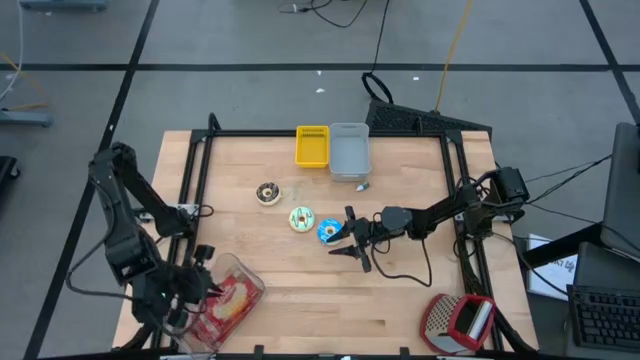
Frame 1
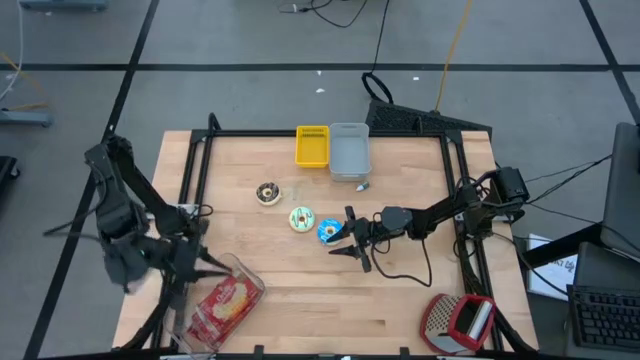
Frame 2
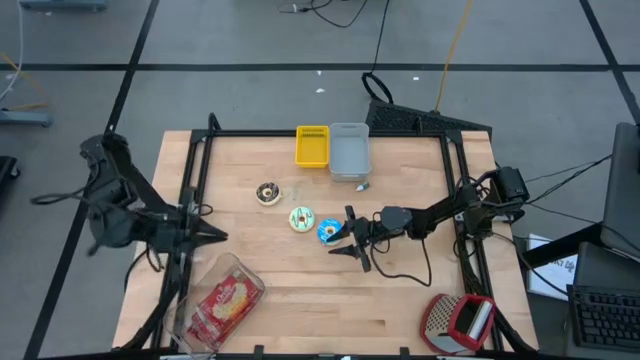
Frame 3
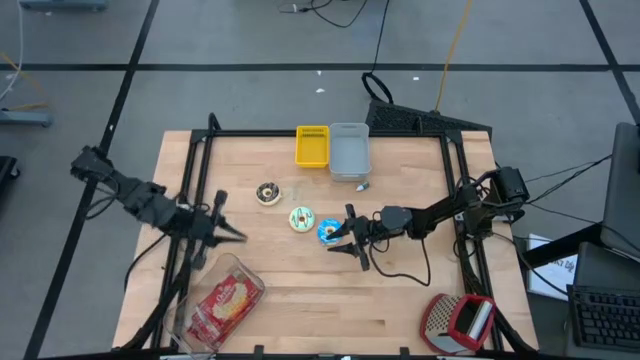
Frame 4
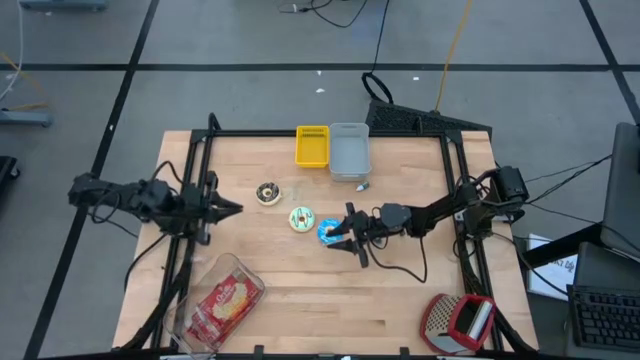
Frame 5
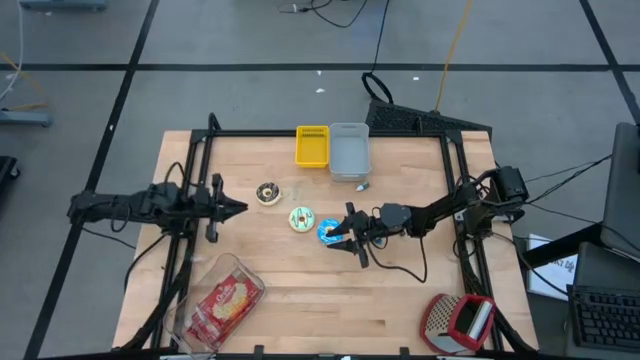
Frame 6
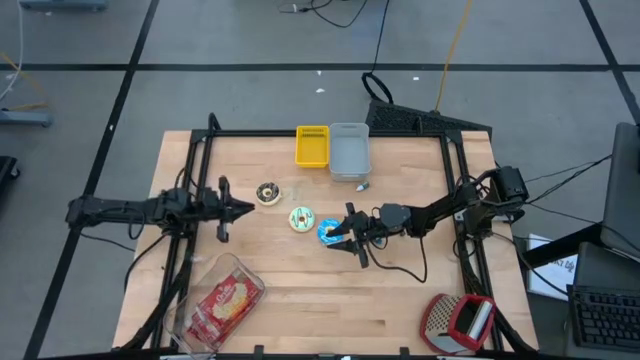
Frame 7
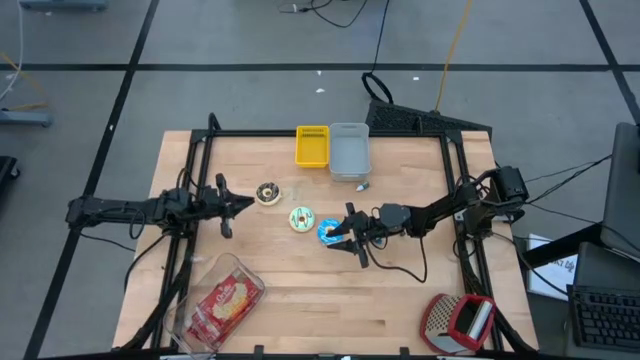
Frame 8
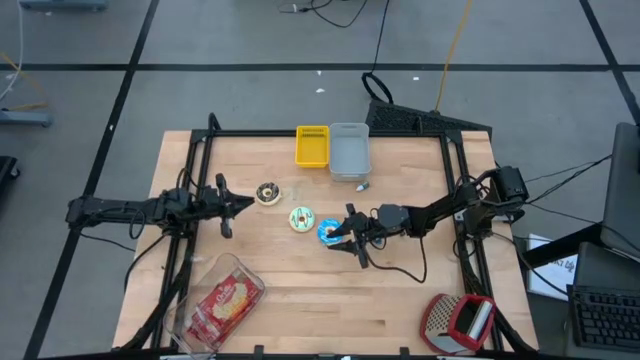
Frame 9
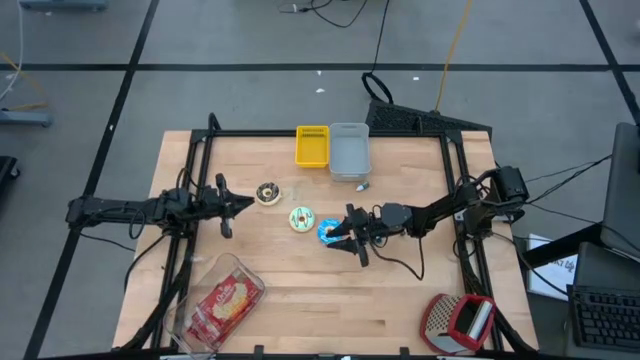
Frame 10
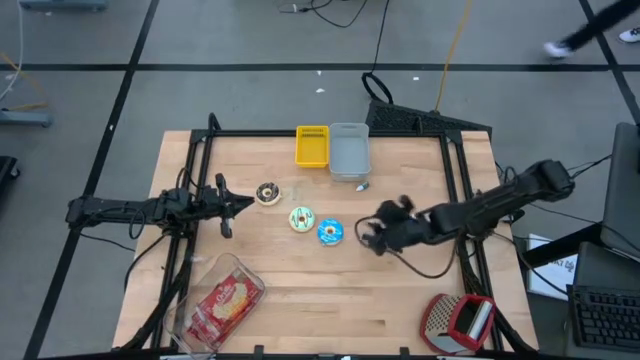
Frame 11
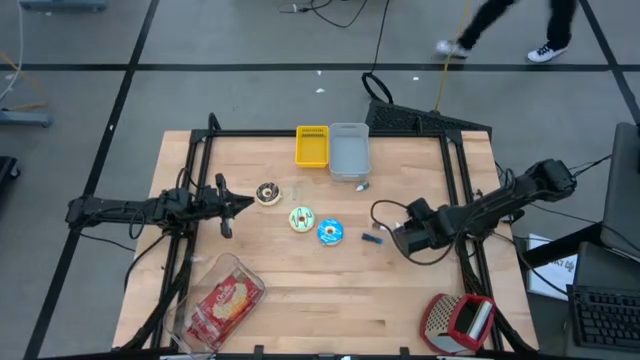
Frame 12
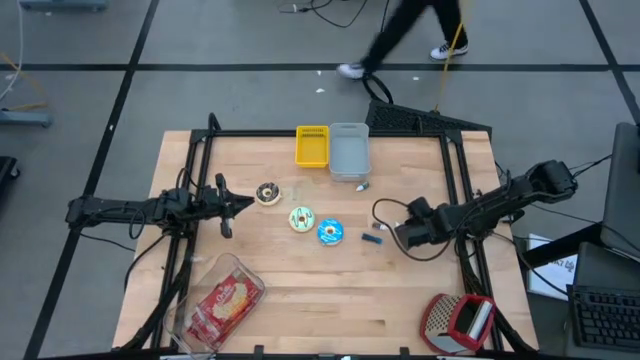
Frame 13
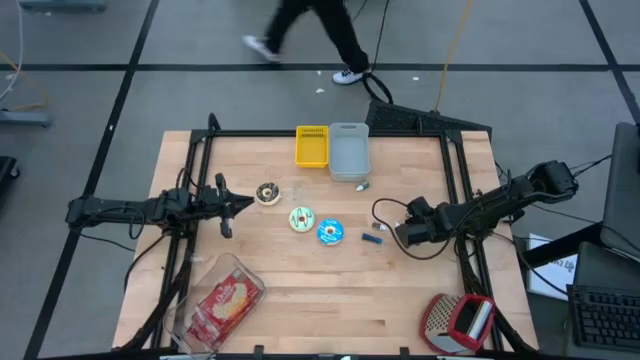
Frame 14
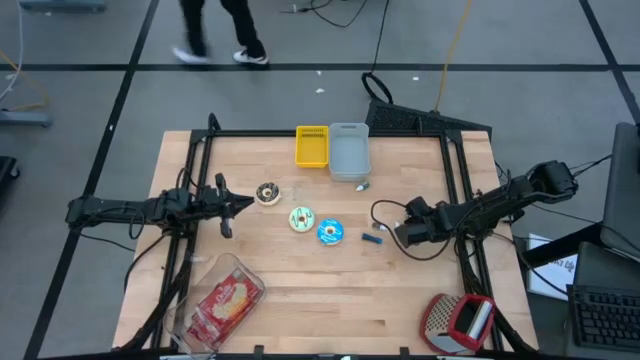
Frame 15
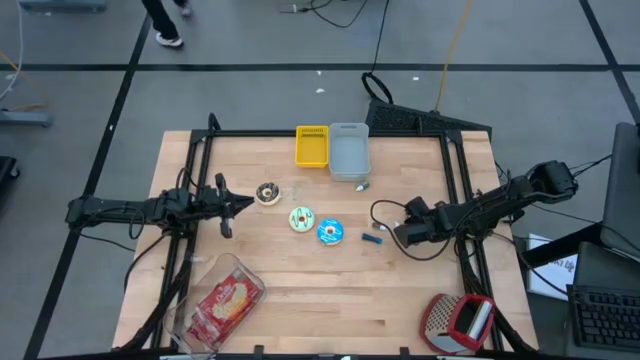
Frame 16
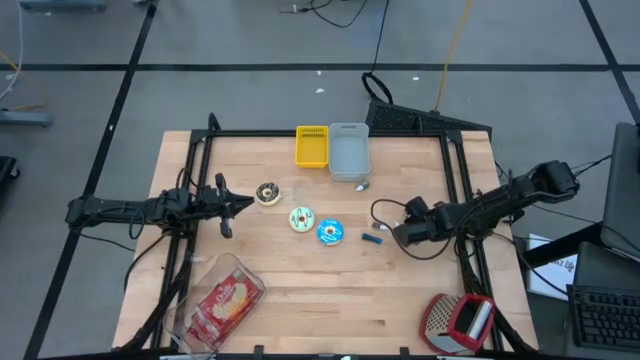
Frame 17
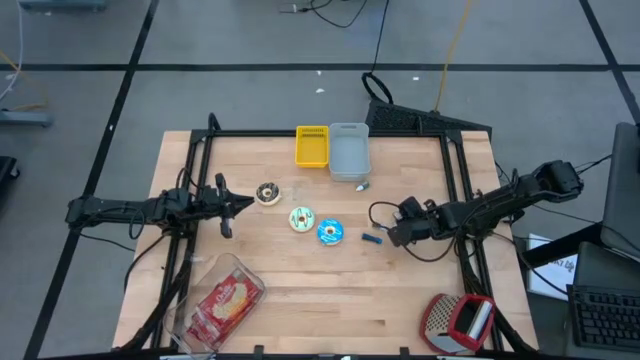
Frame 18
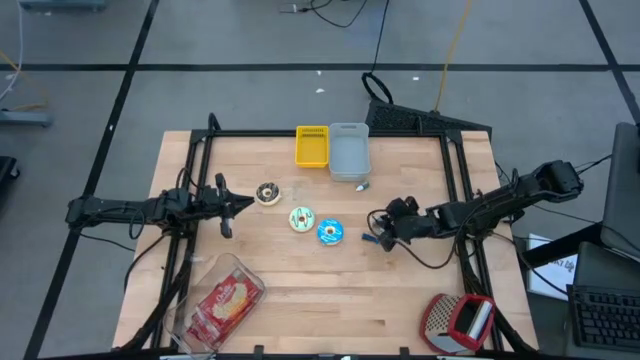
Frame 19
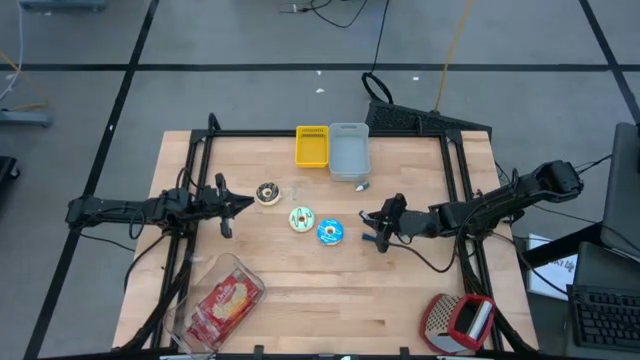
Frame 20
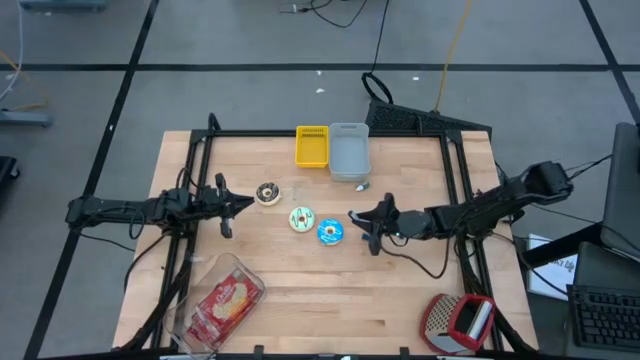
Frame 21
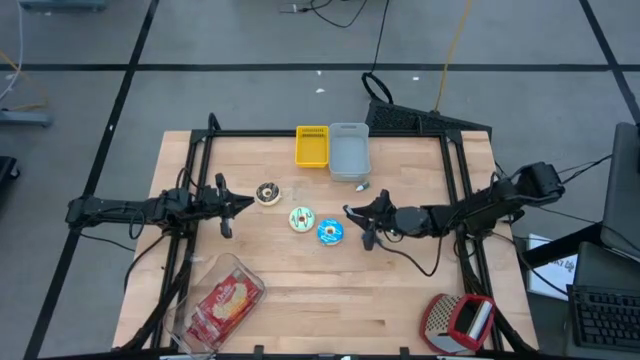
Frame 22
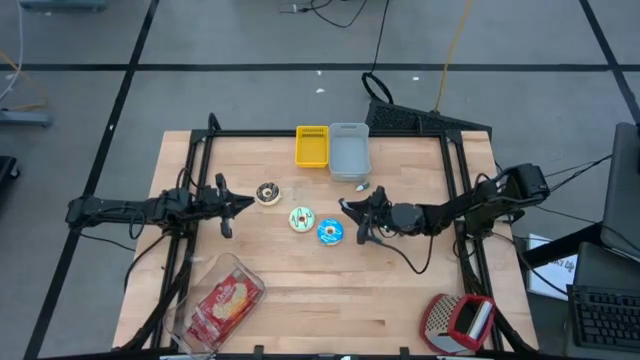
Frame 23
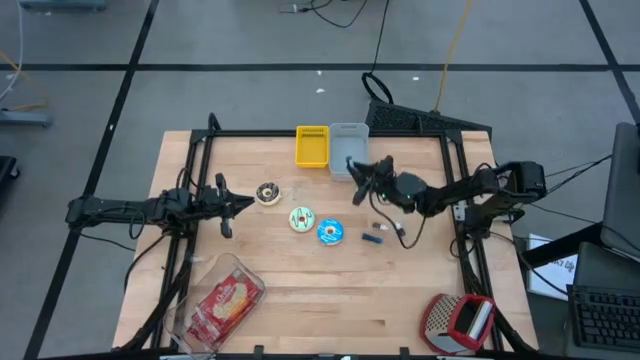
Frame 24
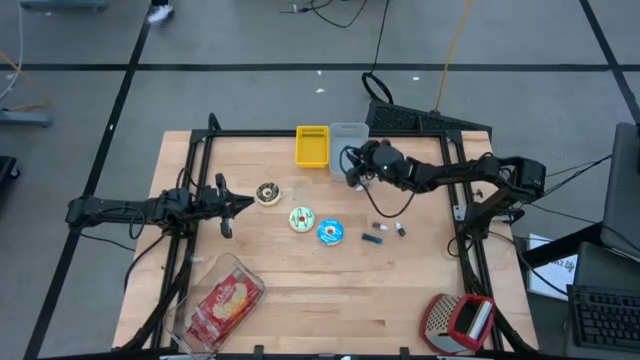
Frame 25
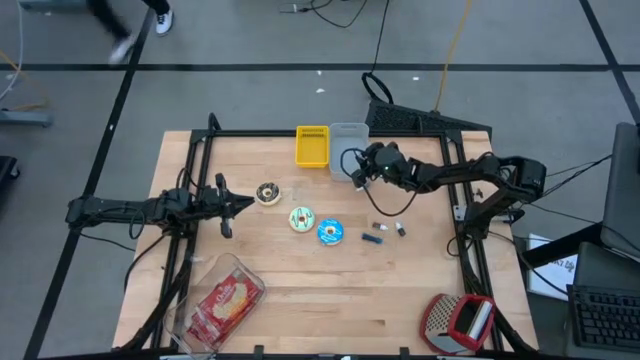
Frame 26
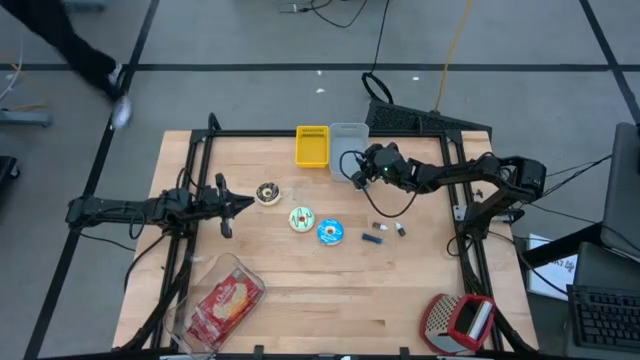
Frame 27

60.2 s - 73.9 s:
Put the blue food coloring bottle into the white bin

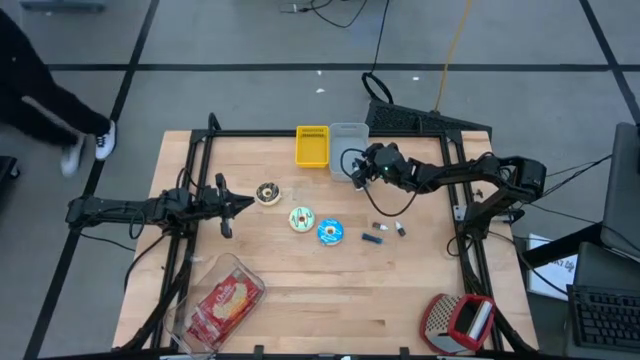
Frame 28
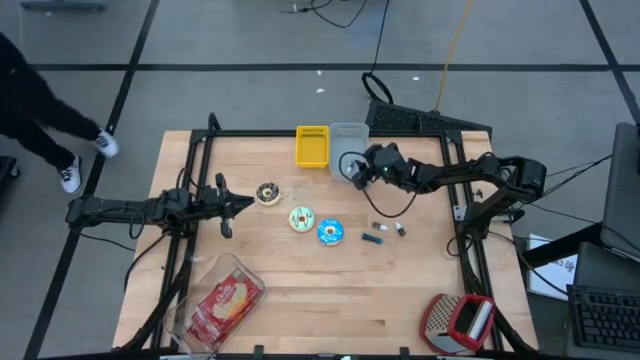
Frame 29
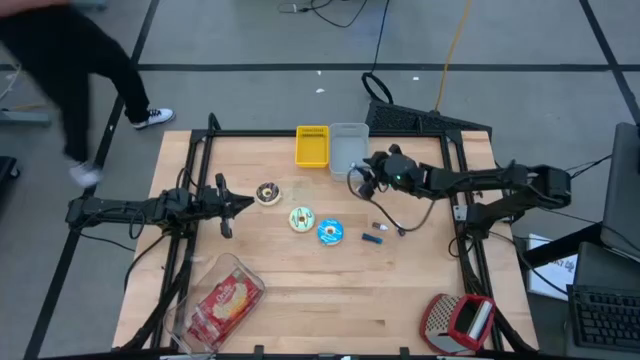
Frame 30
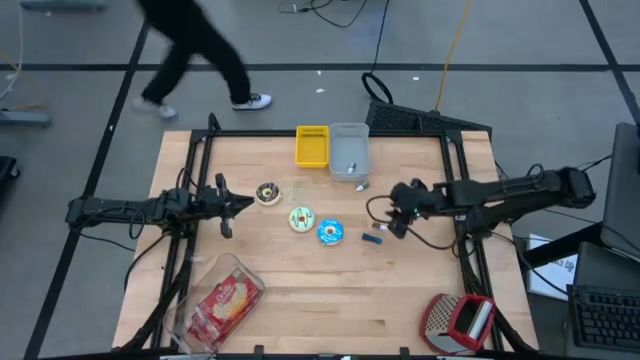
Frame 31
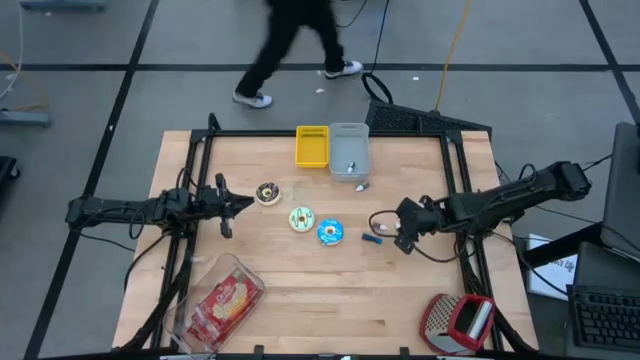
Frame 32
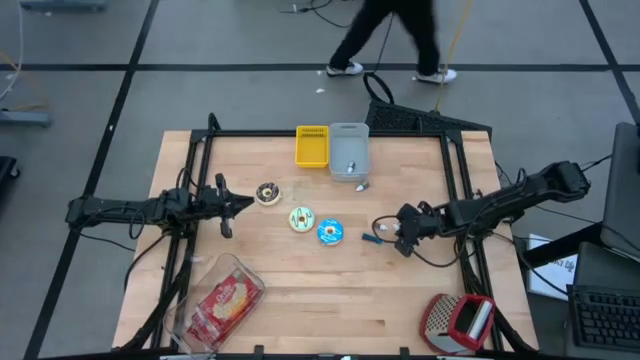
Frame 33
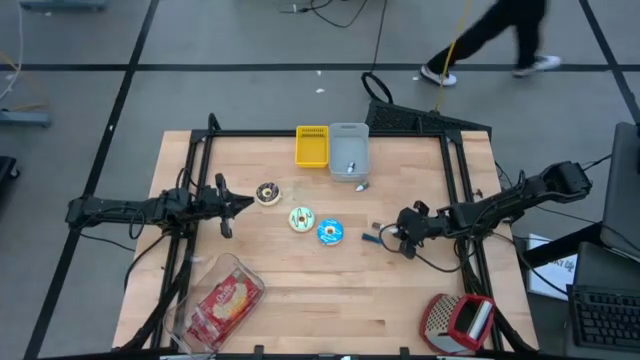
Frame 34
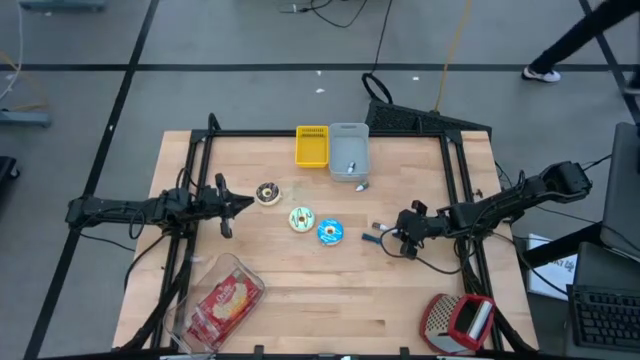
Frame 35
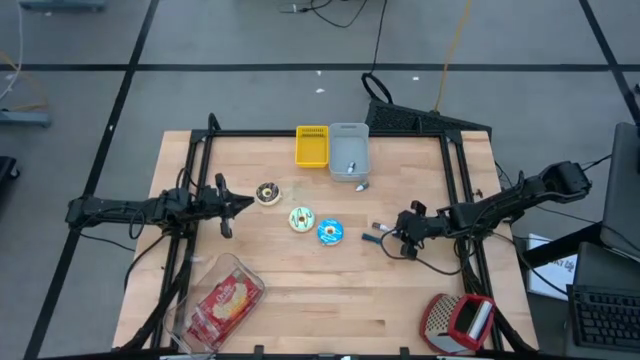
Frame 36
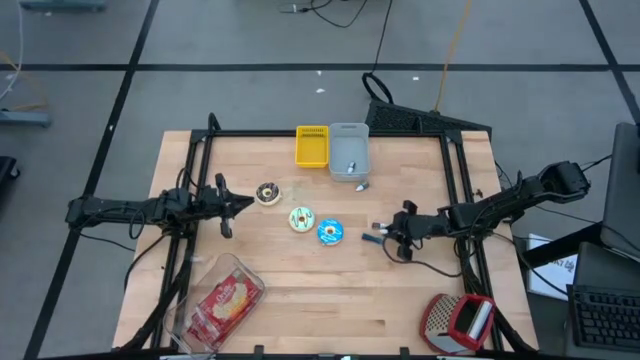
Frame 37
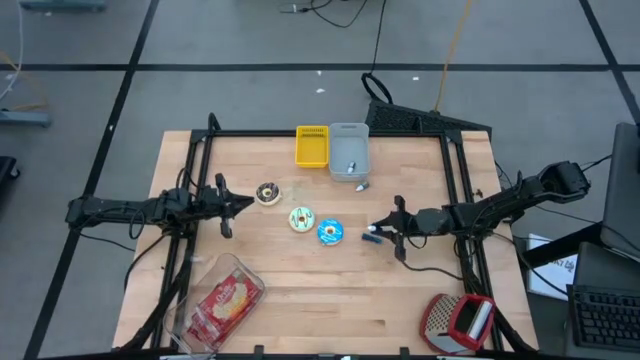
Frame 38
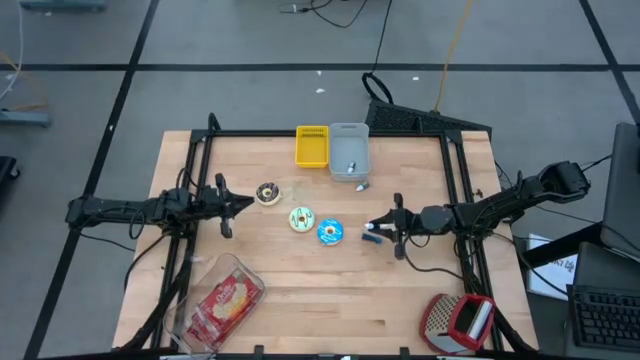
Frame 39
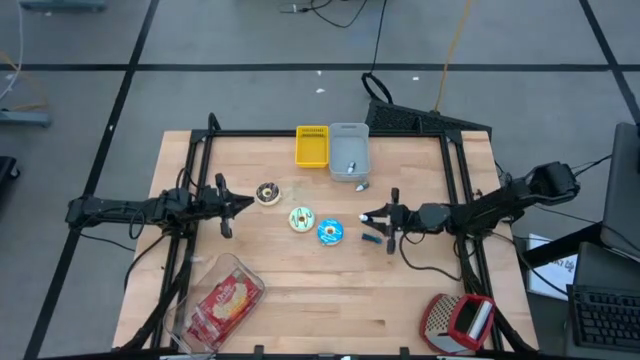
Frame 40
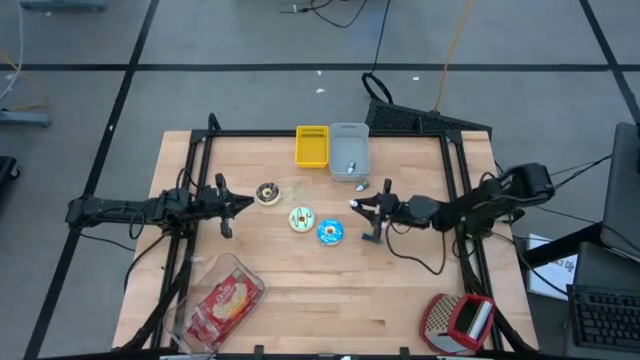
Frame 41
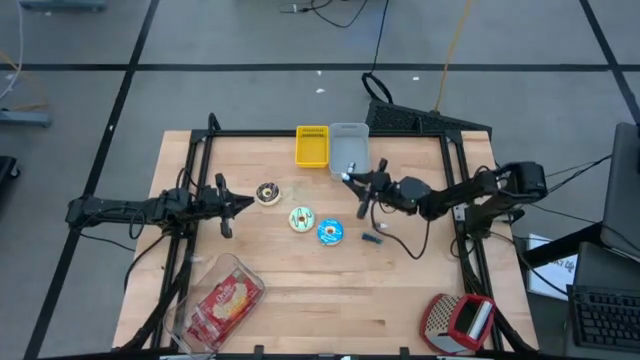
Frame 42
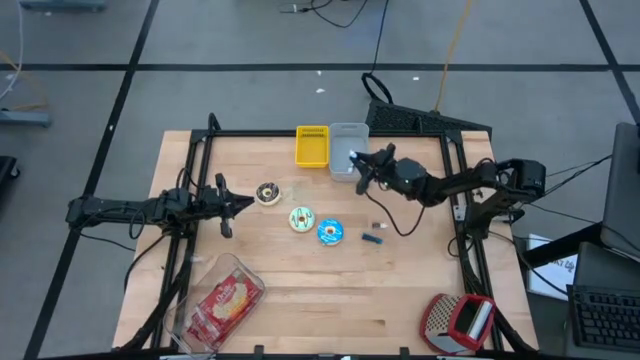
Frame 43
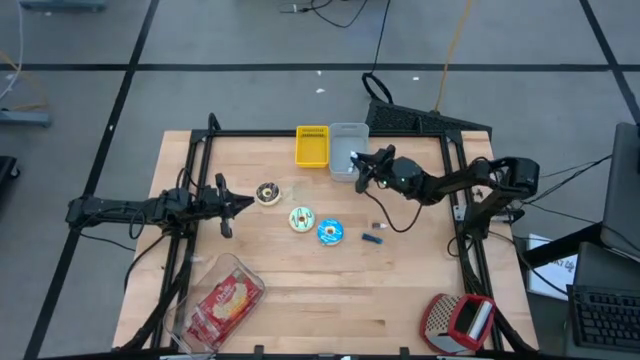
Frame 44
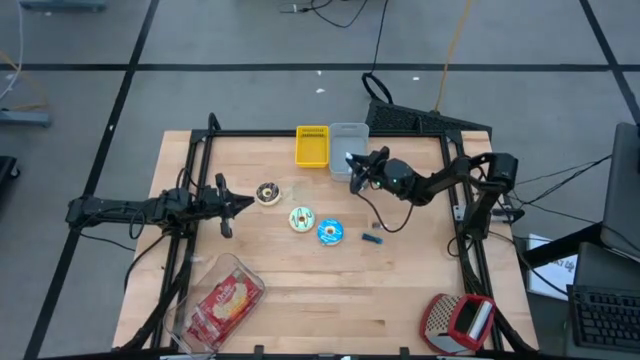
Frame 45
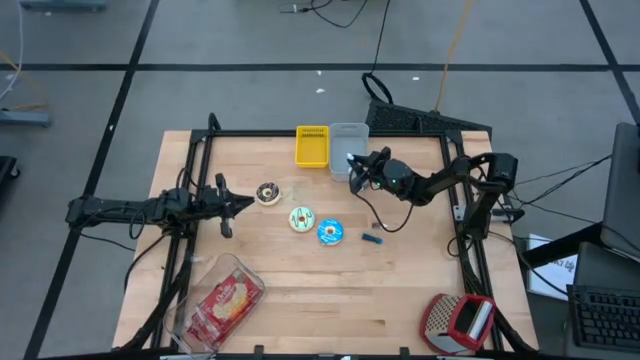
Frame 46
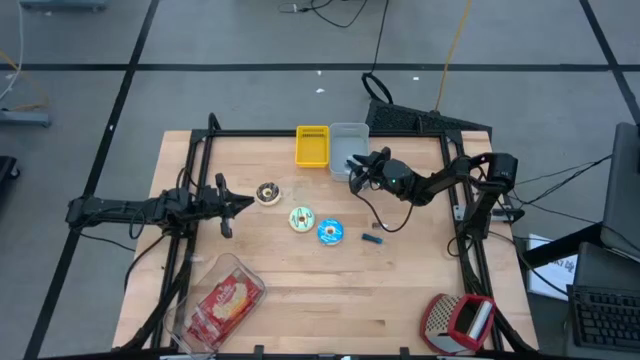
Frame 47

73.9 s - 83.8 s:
Put the black food coloring bottle into the white bin
